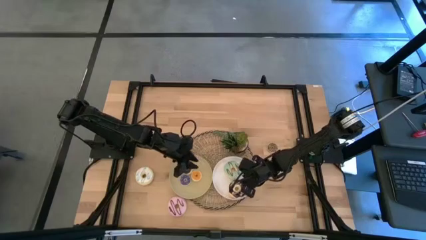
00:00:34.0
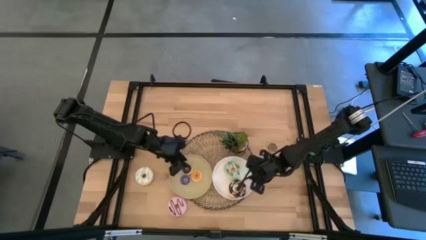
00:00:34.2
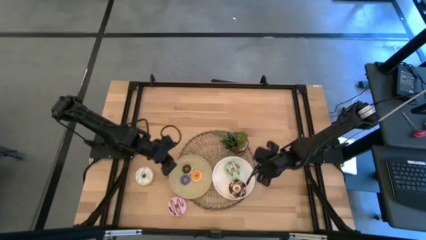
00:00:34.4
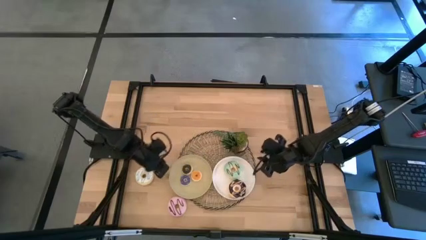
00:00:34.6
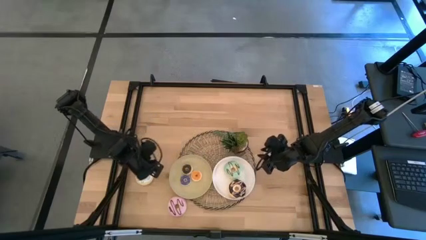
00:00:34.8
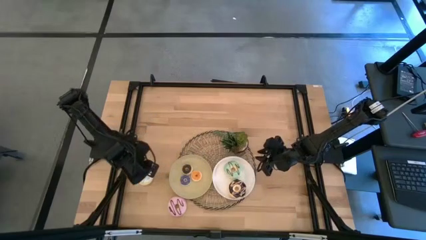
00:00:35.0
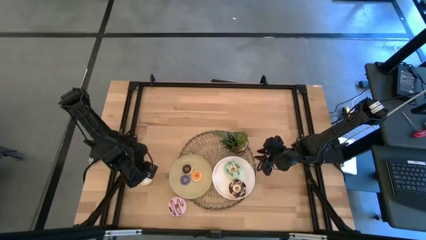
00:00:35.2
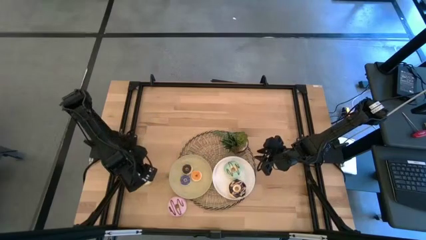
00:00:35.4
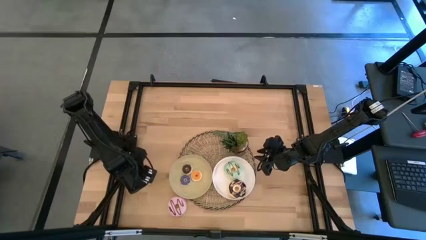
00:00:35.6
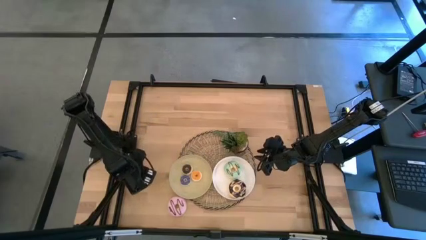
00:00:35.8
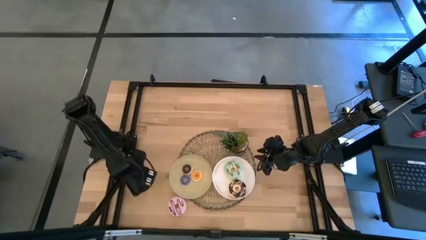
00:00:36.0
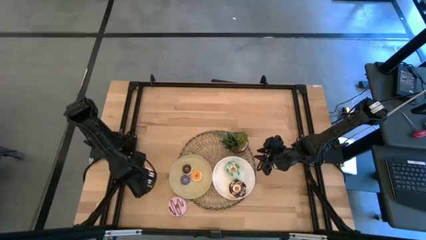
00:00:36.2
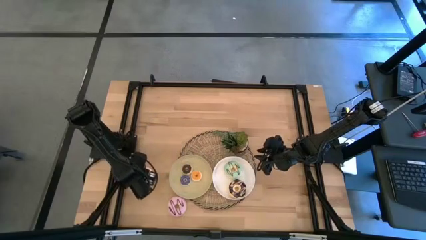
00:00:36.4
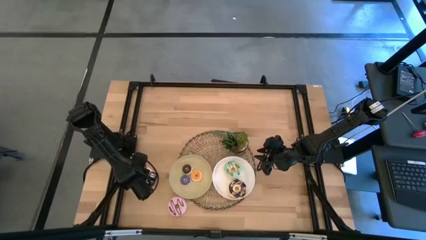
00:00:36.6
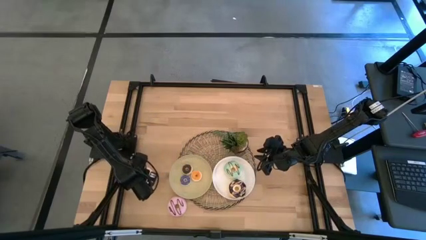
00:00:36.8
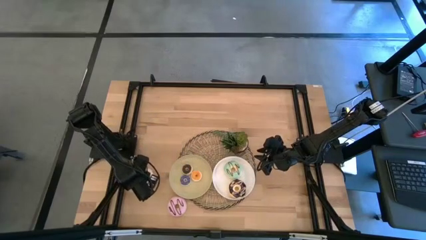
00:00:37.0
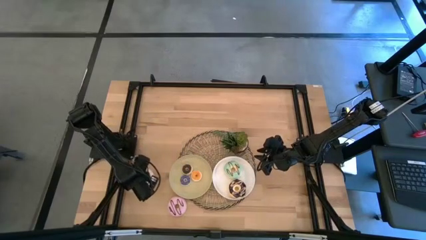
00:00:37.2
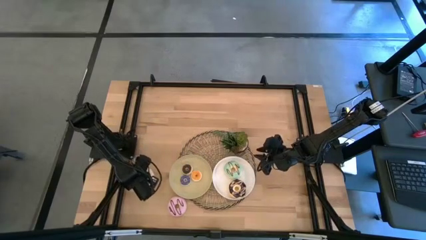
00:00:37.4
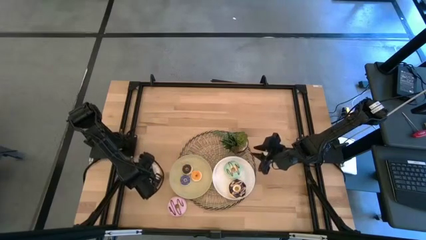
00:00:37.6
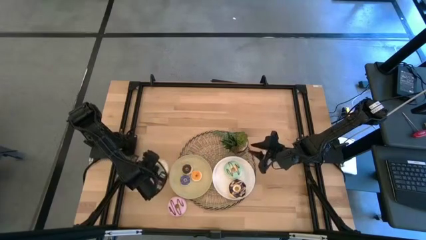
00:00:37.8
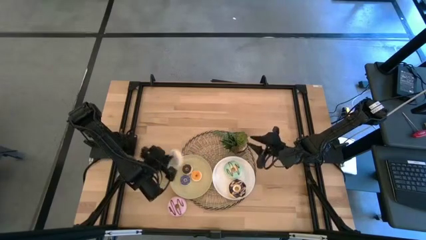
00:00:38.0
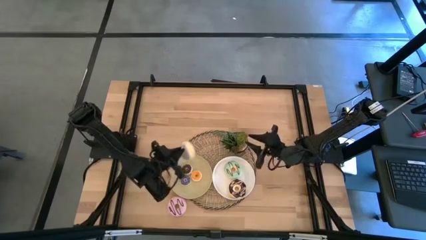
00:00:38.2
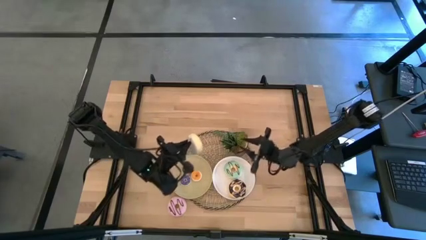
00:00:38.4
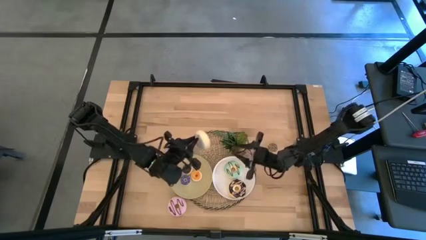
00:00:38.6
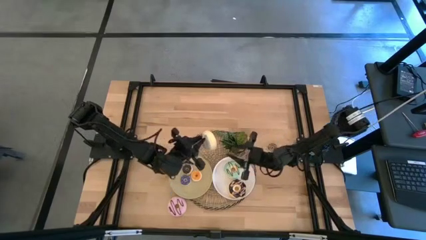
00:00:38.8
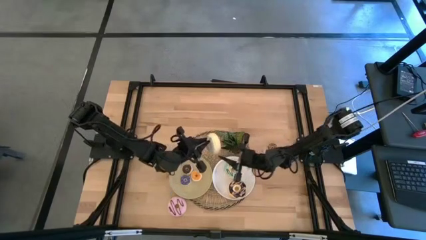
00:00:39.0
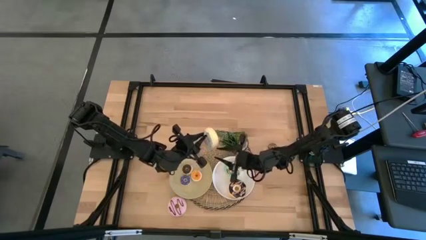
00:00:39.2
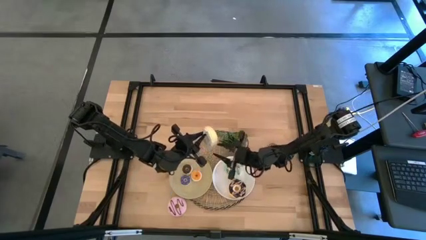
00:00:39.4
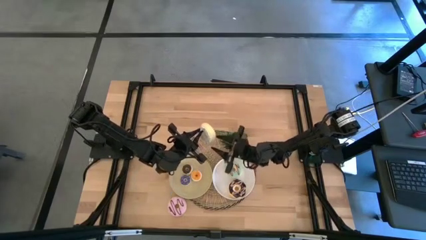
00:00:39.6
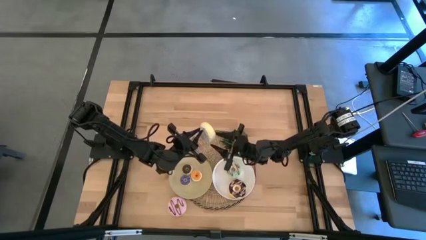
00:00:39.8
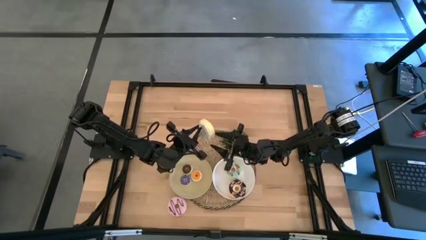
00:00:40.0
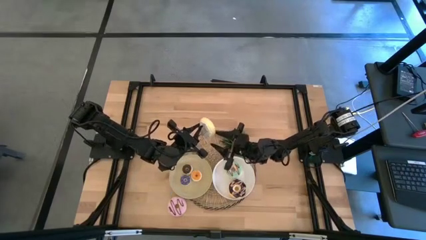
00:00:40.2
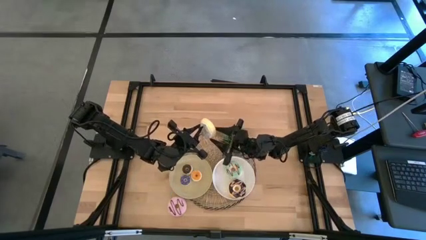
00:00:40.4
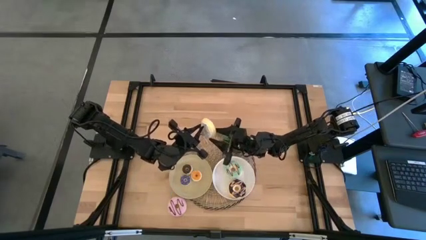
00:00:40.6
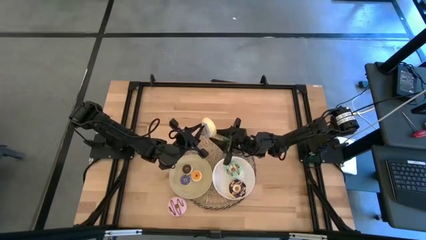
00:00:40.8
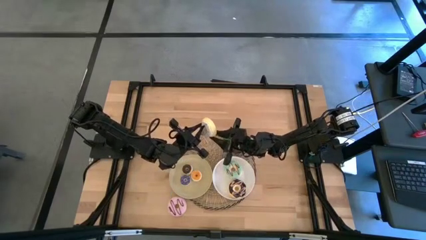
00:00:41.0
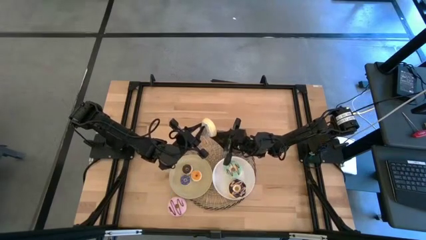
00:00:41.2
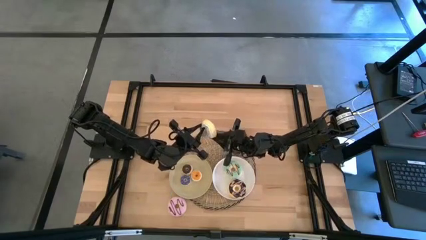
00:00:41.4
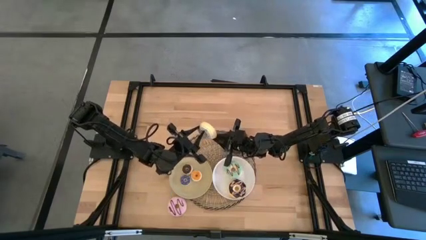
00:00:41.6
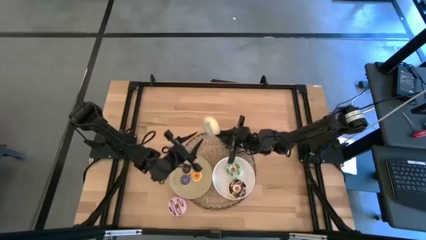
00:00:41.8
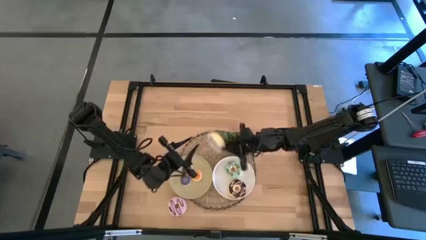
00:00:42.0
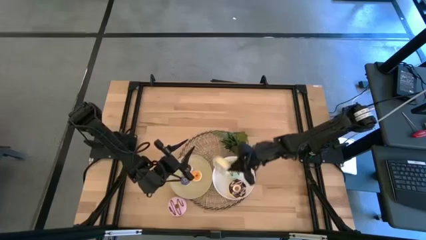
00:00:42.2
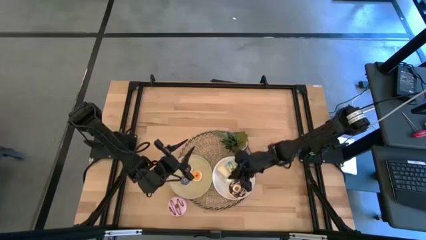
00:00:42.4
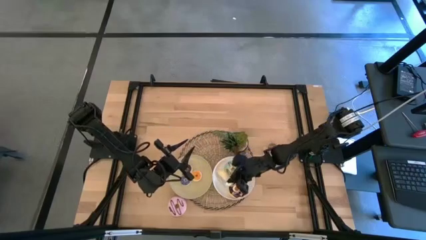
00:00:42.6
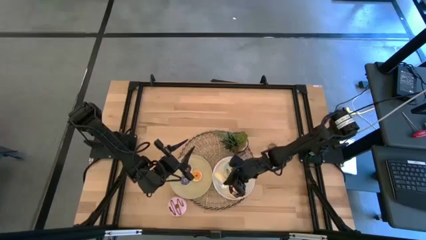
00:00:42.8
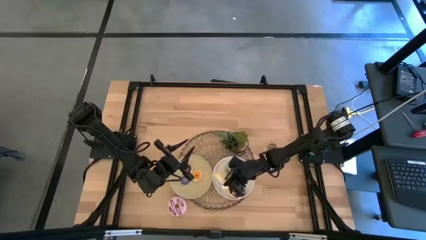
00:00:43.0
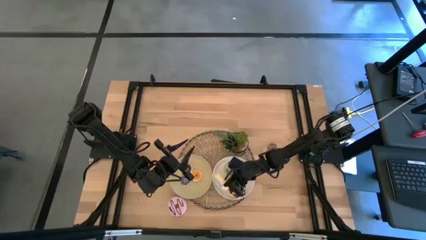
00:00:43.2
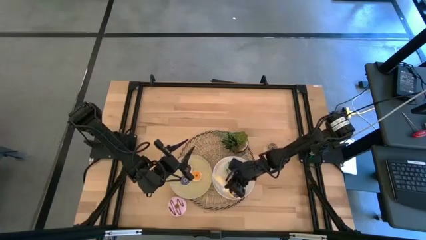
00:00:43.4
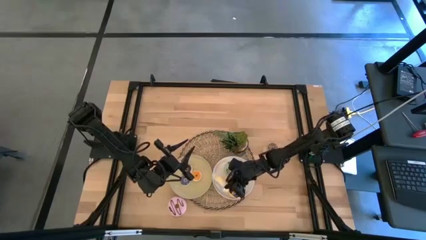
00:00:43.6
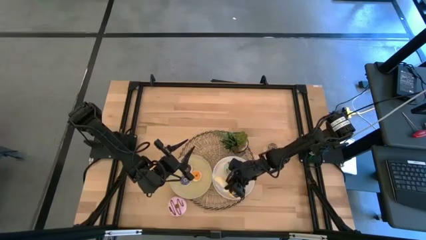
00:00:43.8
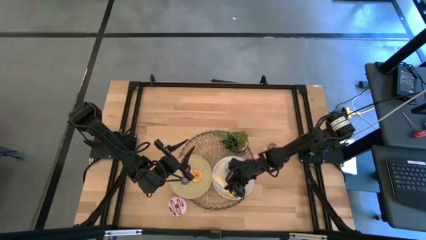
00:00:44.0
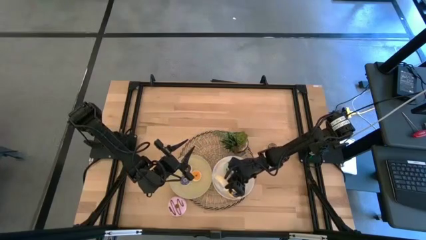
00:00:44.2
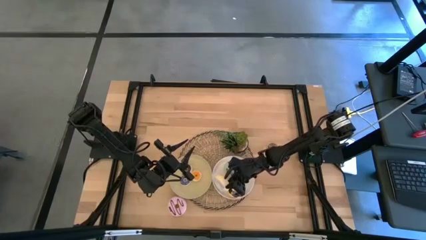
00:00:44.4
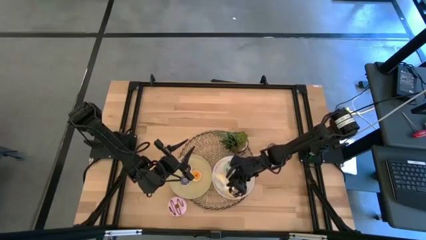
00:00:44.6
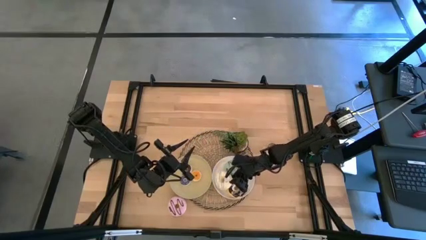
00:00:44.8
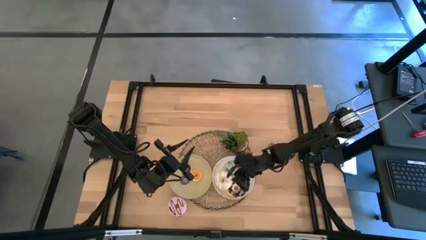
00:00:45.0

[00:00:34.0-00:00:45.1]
Task: Pick & Place donuts
Put the large white donut on the white plate

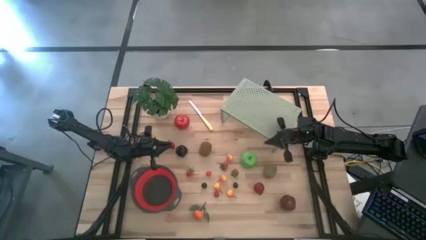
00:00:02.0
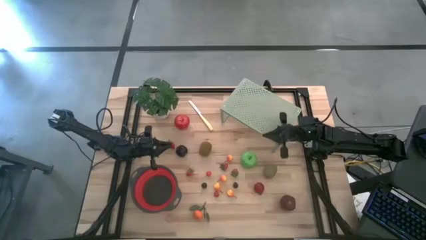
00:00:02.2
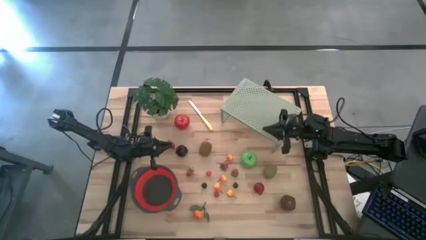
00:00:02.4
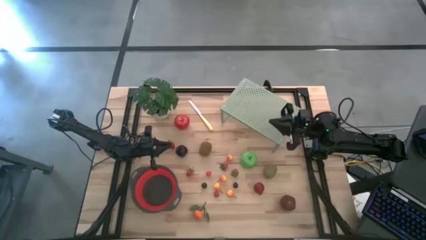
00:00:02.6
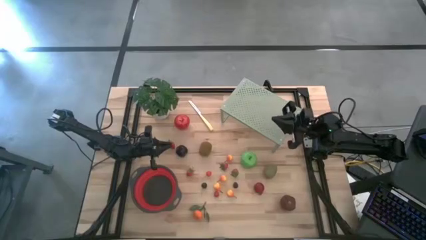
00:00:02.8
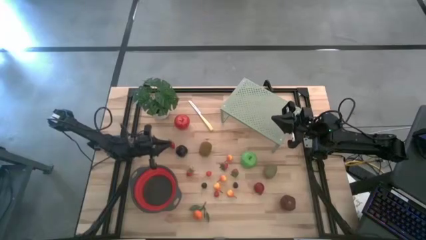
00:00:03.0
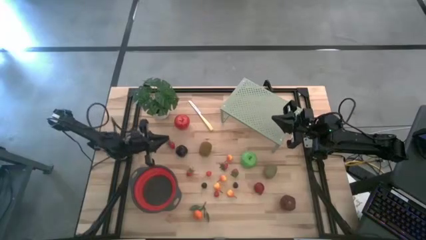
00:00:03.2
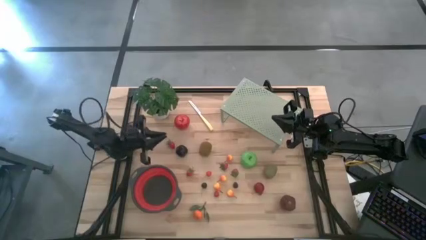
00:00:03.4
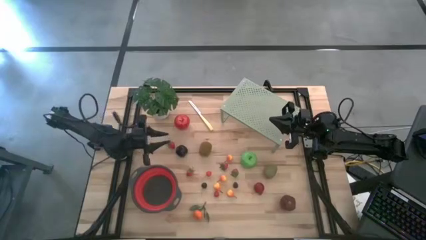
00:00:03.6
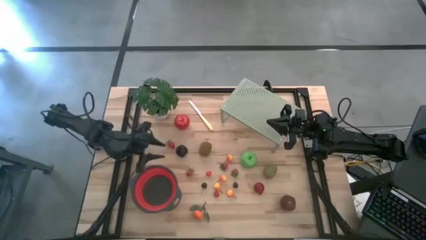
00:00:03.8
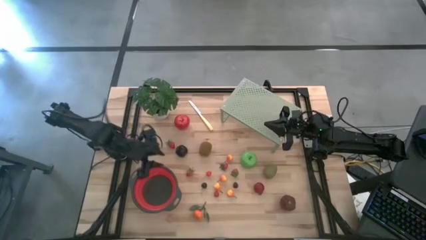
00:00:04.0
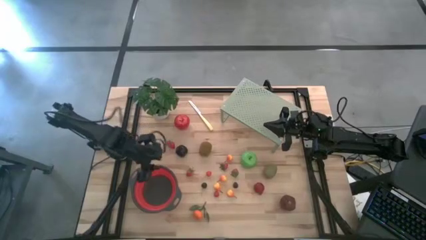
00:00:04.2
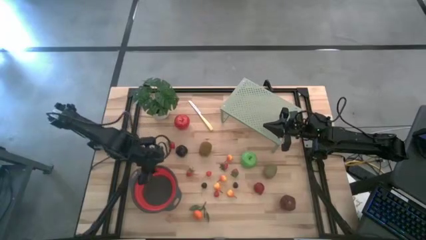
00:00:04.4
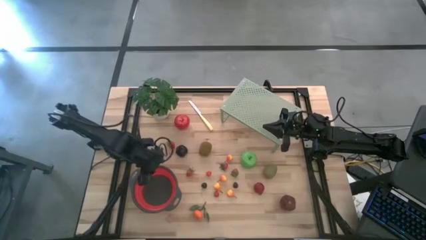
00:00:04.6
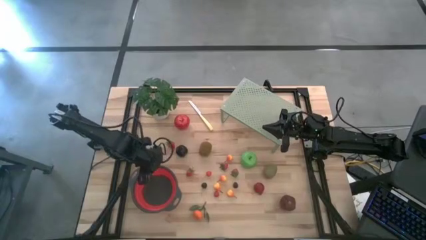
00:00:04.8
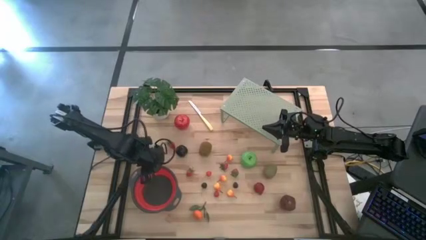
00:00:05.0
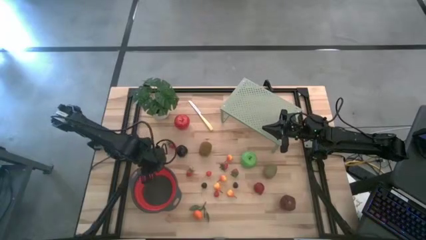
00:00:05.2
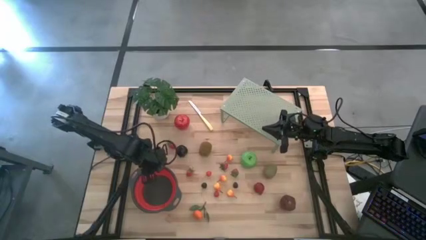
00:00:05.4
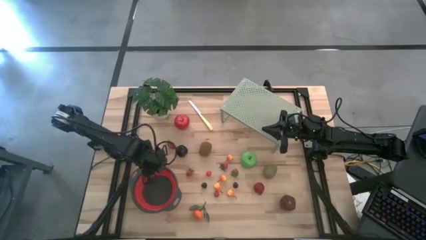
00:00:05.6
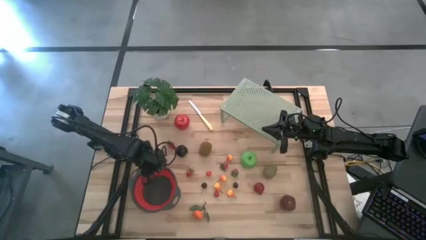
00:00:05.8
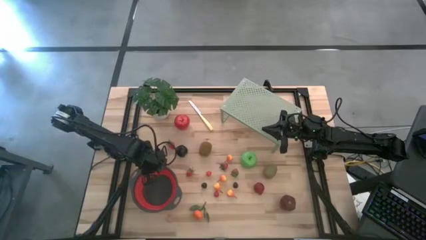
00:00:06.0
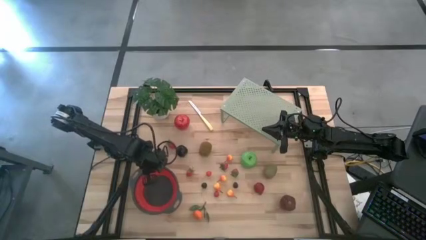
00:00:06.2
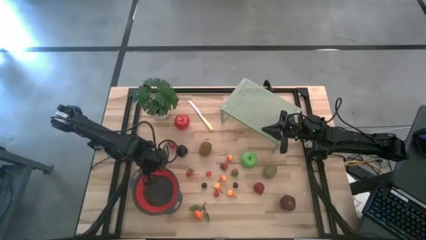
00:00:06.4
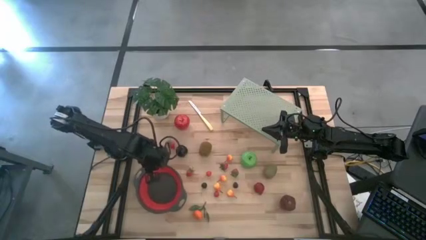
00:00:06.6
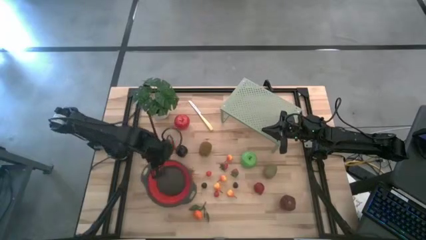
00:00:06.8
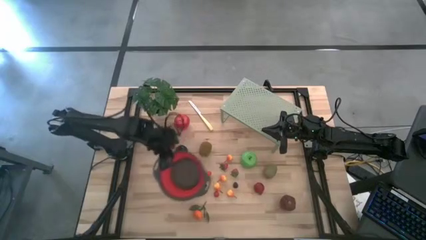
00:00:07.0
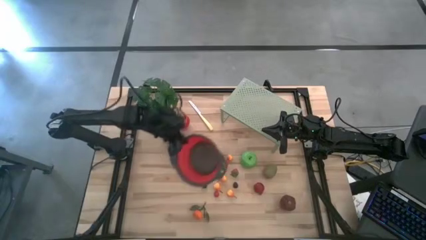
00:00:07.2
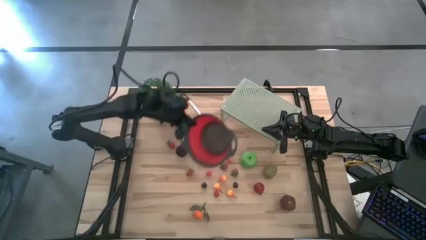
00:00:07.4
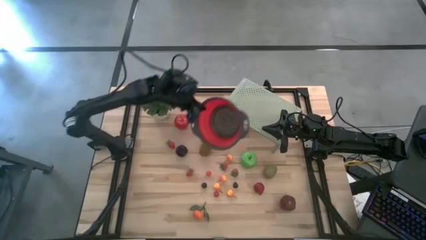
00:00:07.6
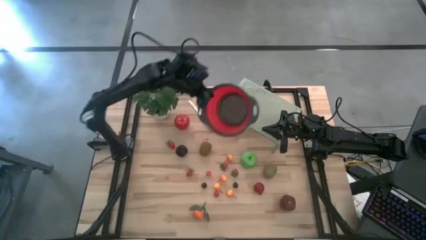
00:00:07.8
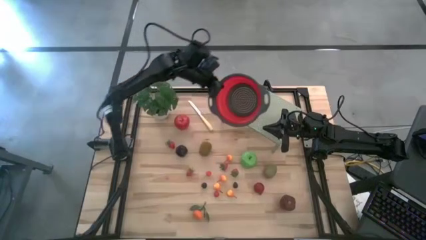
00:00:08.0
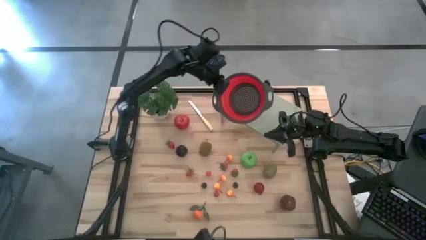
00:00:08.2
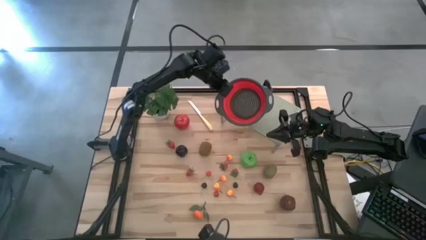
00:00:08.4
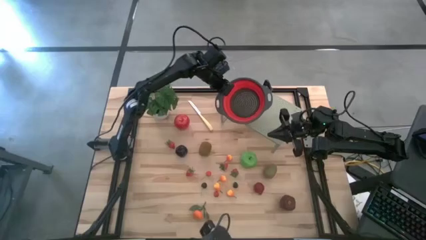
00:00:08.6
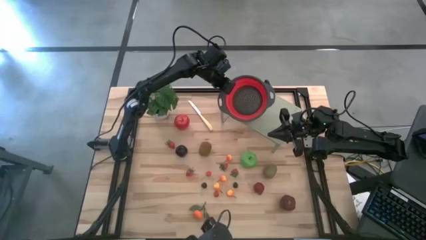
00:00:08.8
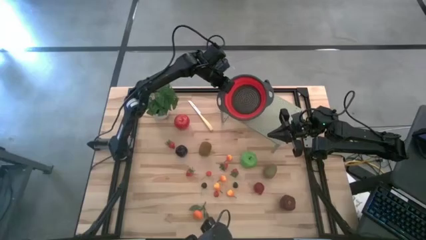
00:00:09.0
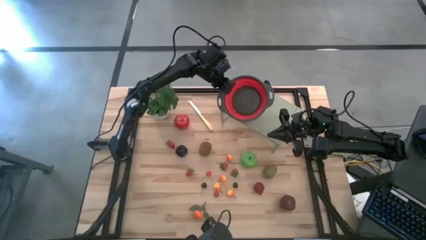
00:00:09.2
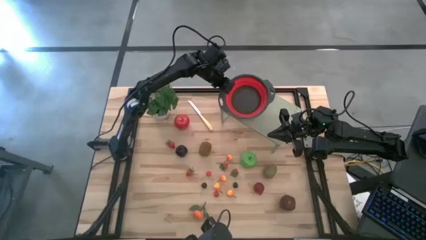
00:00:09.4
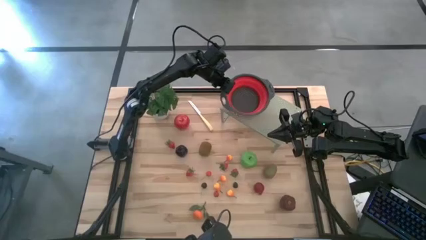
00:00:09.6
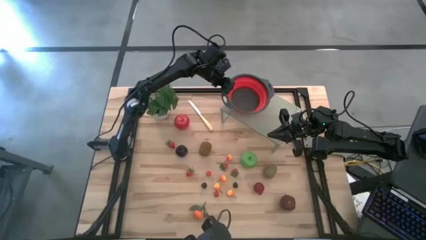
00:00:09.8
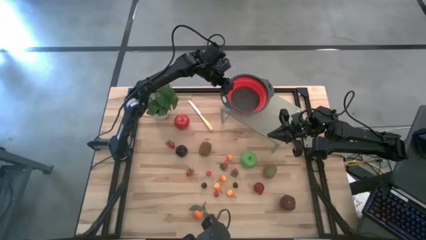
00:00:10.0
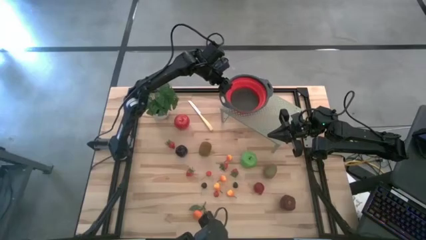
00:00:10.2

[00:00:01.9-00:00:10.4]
Task: Pick & Place Fruit
Put the red gray on the shelf
